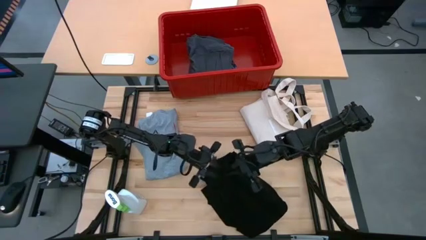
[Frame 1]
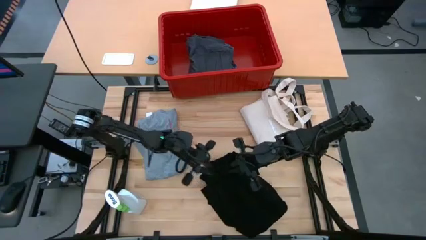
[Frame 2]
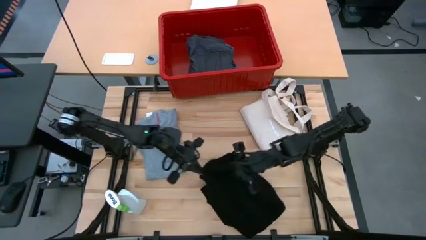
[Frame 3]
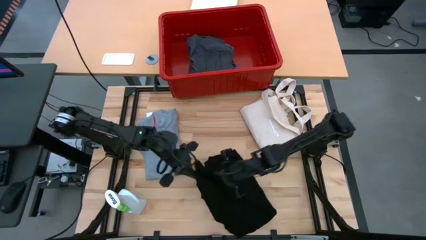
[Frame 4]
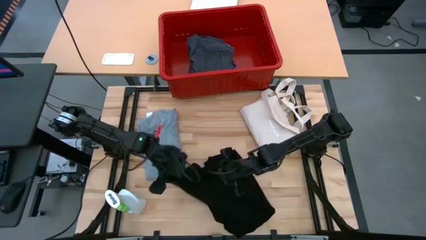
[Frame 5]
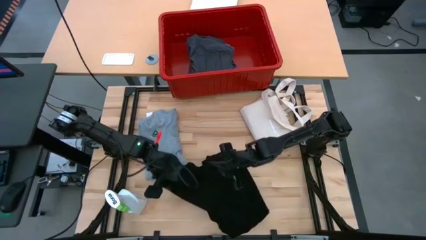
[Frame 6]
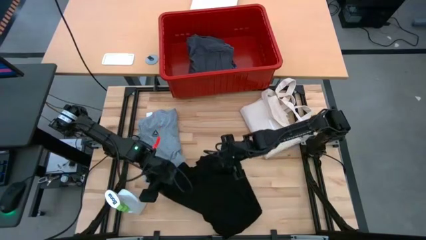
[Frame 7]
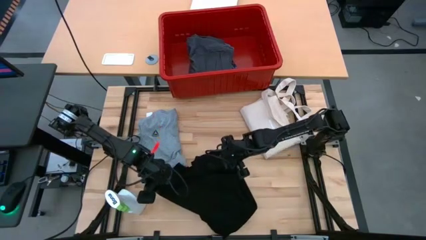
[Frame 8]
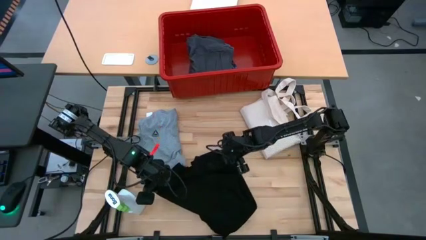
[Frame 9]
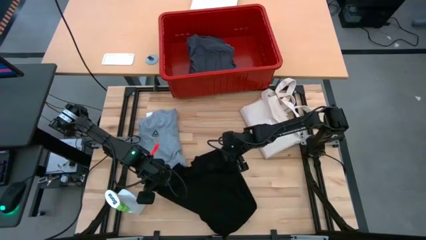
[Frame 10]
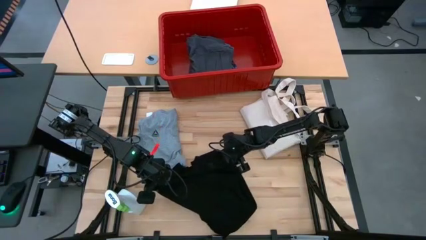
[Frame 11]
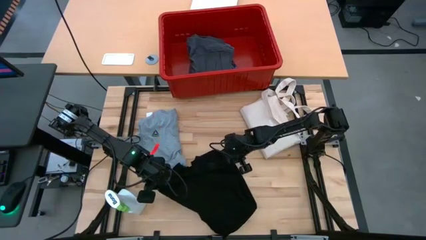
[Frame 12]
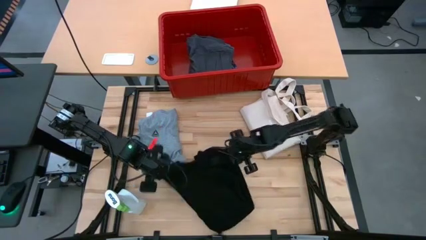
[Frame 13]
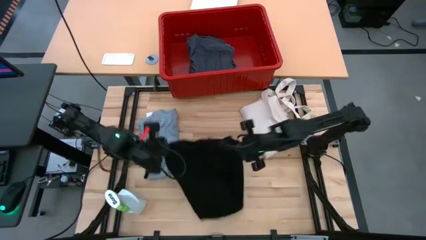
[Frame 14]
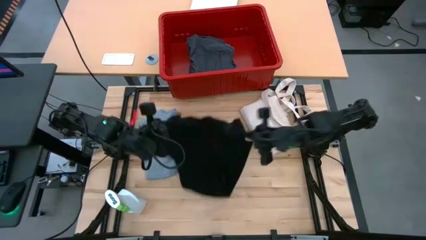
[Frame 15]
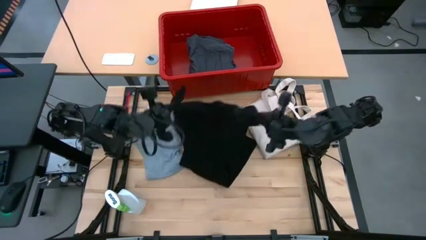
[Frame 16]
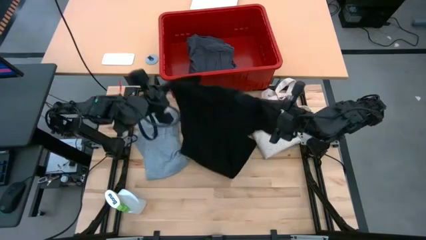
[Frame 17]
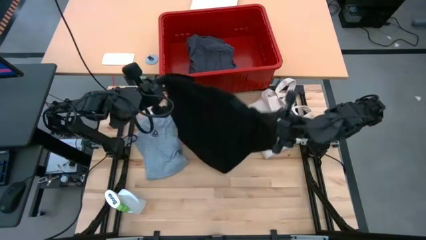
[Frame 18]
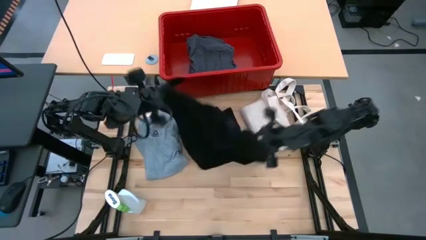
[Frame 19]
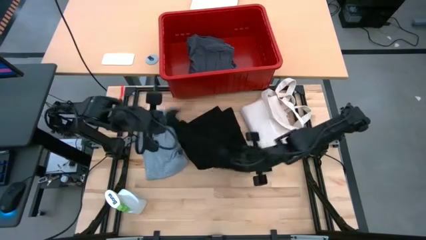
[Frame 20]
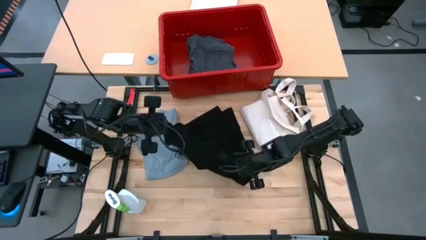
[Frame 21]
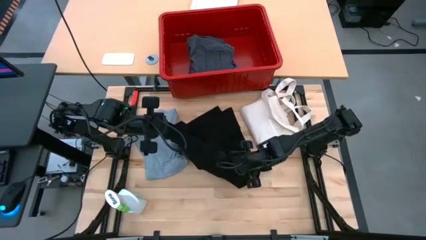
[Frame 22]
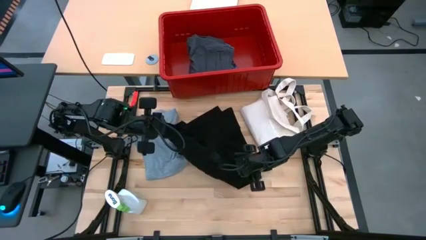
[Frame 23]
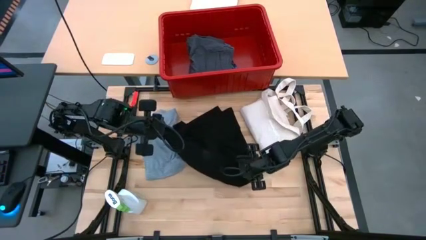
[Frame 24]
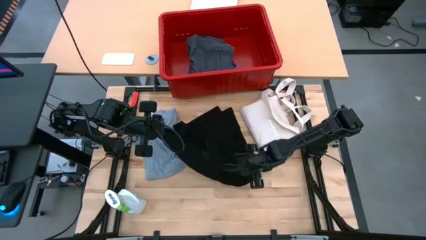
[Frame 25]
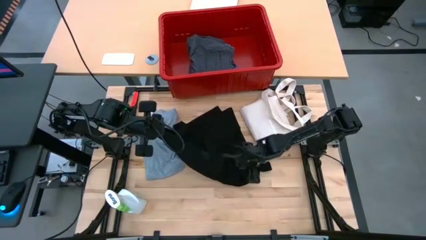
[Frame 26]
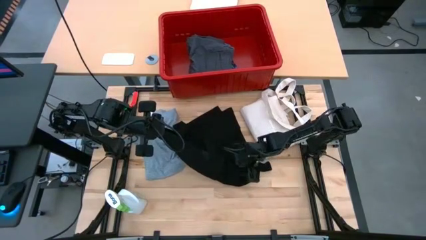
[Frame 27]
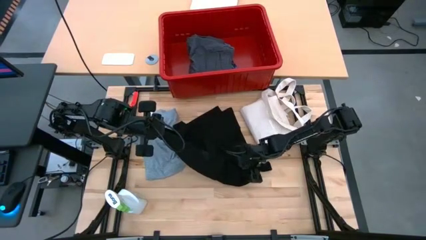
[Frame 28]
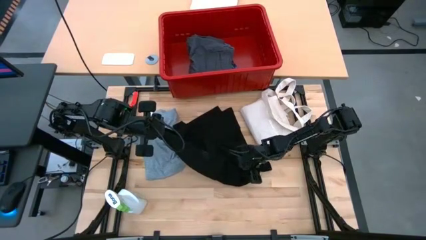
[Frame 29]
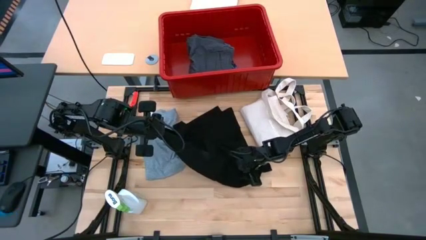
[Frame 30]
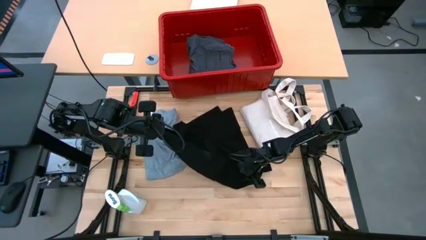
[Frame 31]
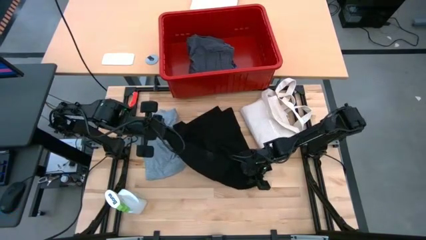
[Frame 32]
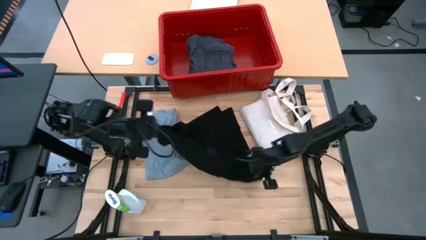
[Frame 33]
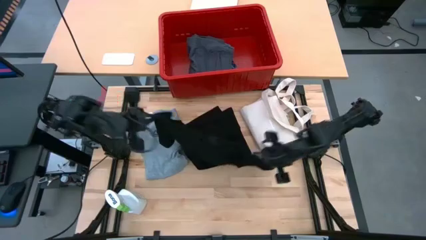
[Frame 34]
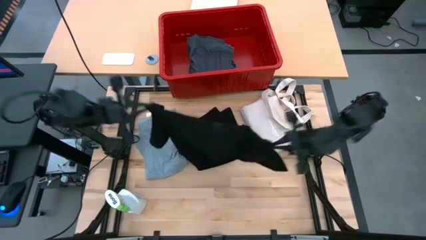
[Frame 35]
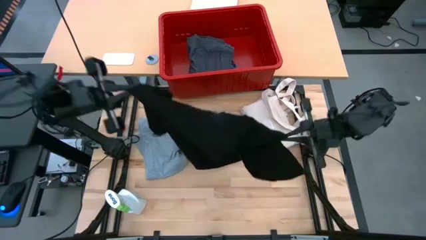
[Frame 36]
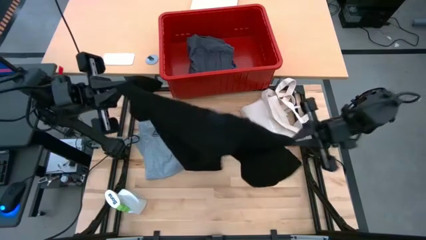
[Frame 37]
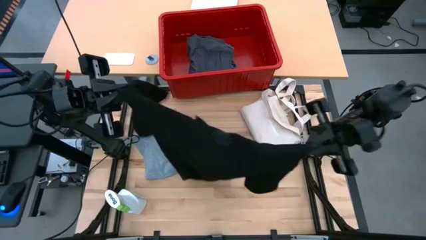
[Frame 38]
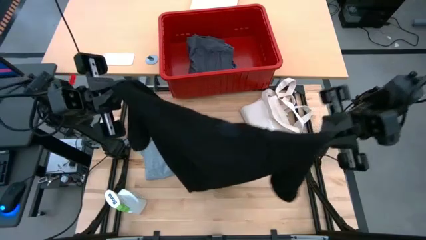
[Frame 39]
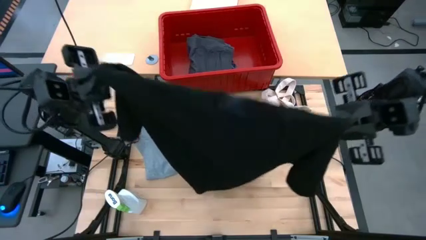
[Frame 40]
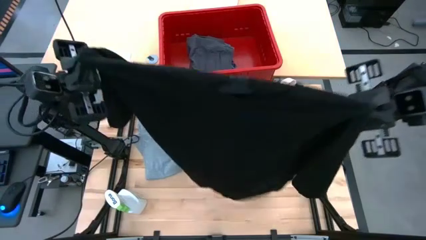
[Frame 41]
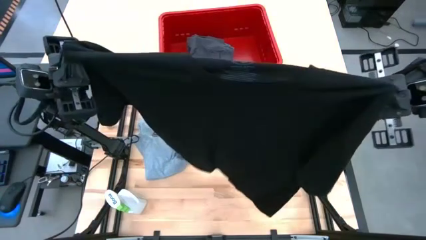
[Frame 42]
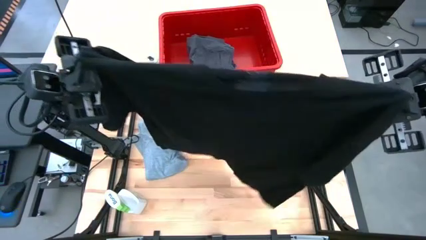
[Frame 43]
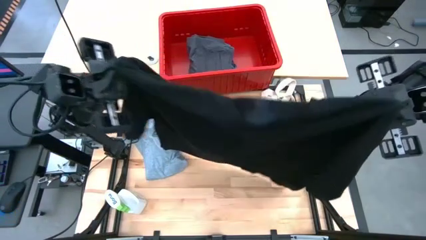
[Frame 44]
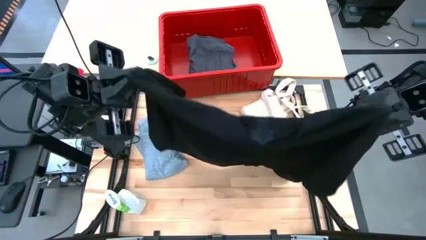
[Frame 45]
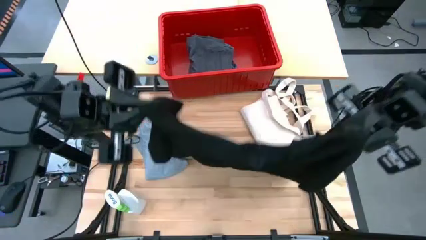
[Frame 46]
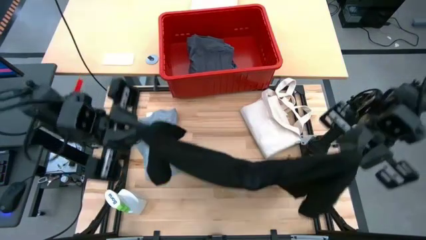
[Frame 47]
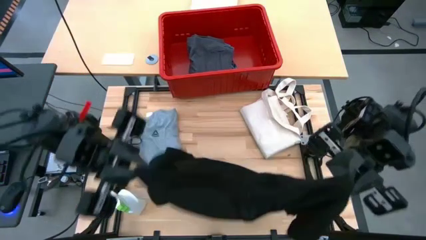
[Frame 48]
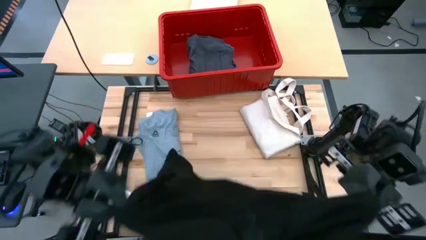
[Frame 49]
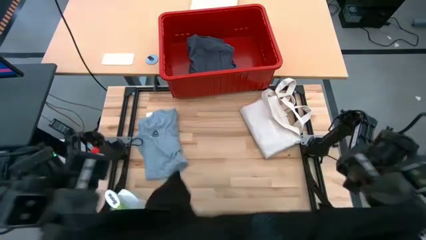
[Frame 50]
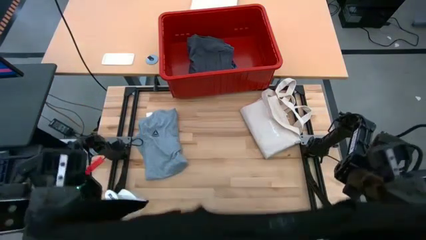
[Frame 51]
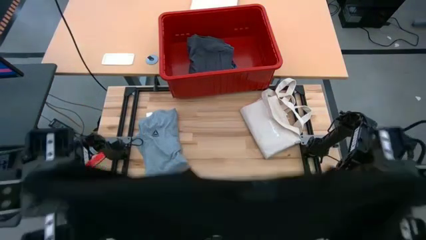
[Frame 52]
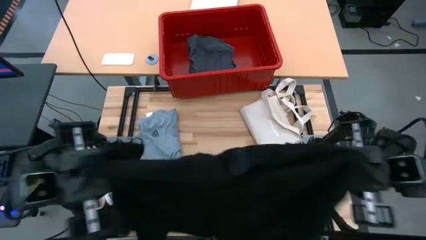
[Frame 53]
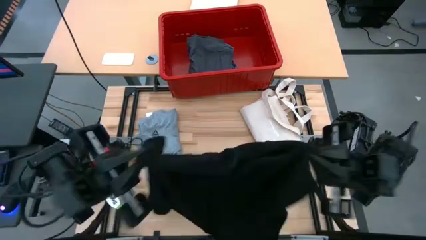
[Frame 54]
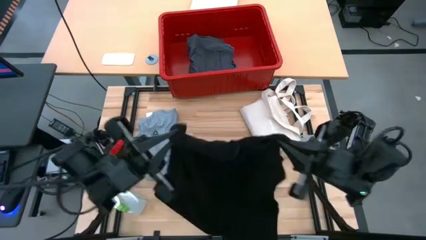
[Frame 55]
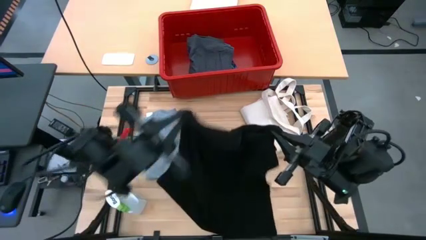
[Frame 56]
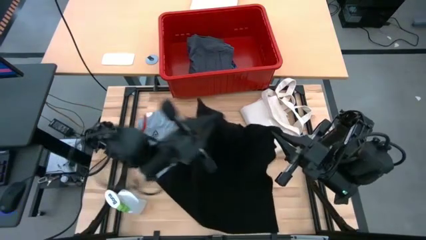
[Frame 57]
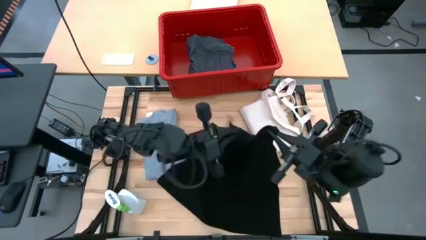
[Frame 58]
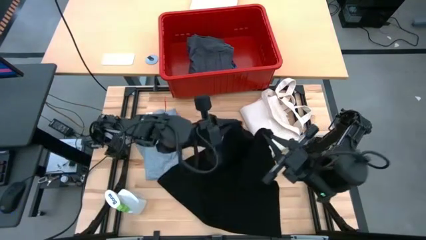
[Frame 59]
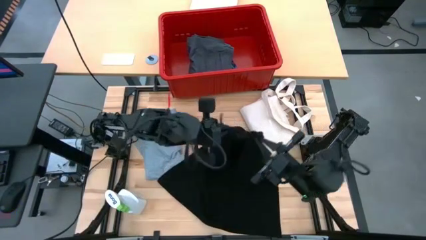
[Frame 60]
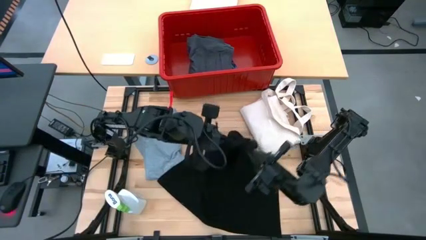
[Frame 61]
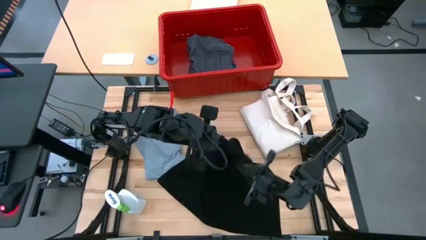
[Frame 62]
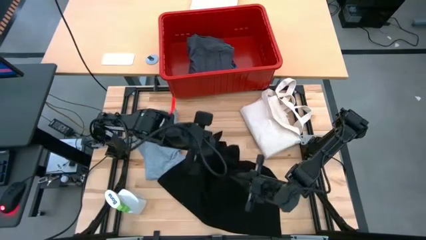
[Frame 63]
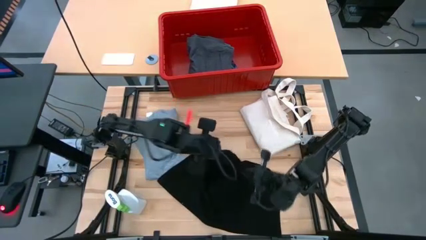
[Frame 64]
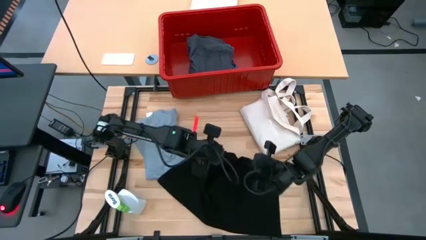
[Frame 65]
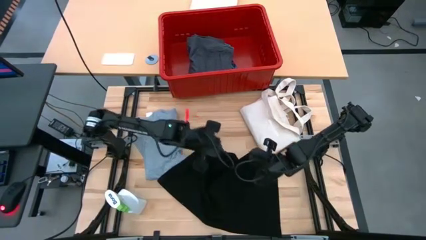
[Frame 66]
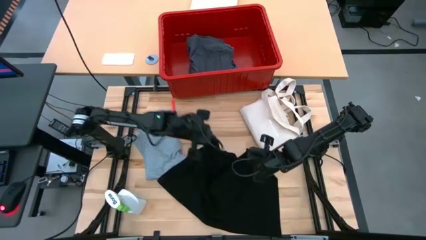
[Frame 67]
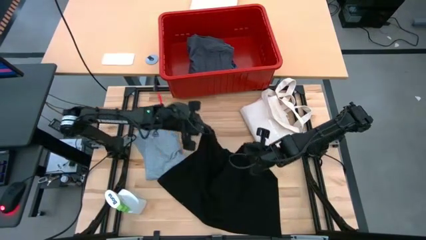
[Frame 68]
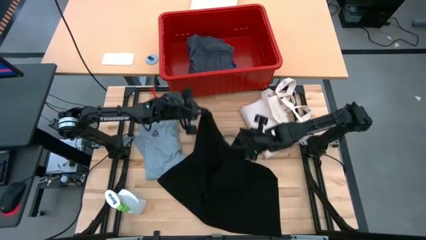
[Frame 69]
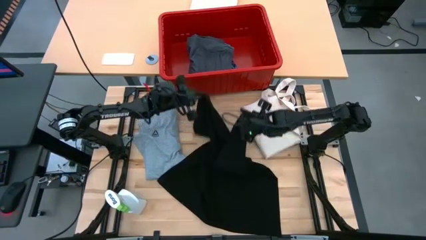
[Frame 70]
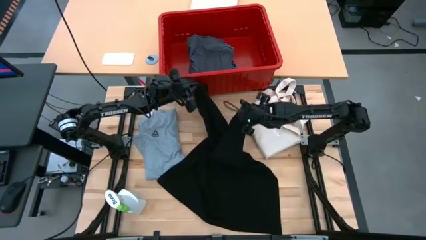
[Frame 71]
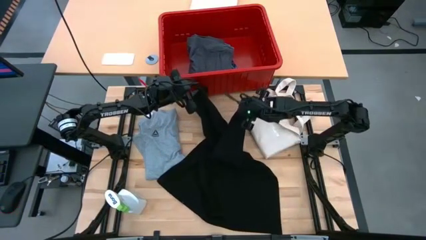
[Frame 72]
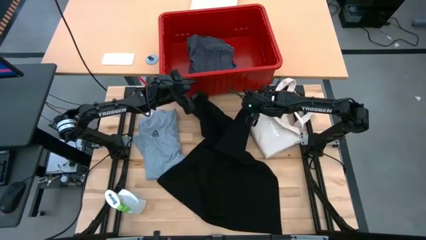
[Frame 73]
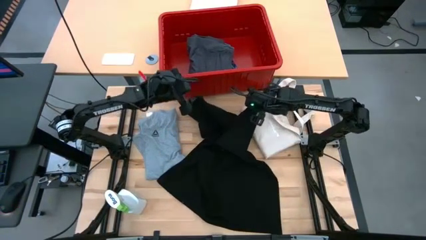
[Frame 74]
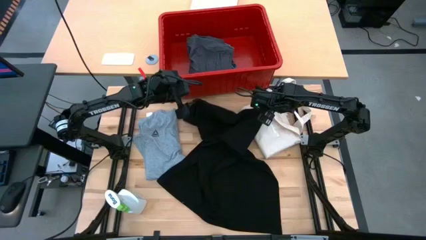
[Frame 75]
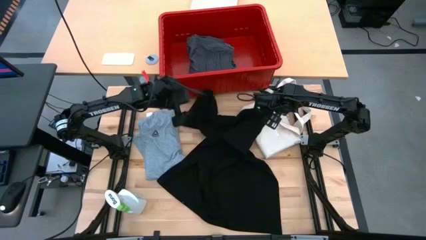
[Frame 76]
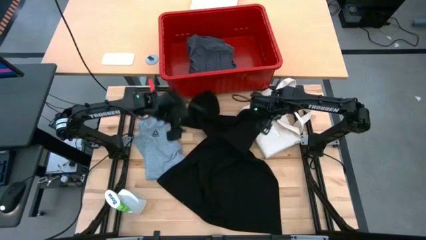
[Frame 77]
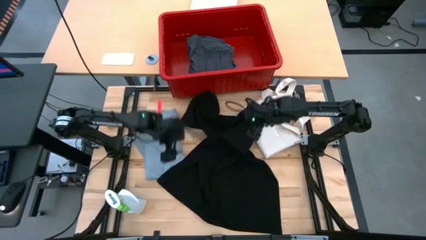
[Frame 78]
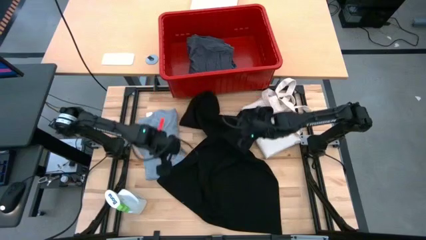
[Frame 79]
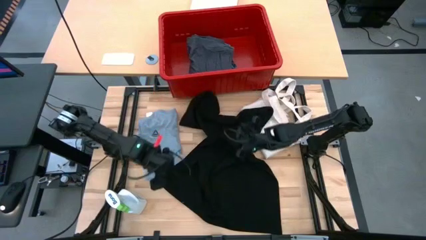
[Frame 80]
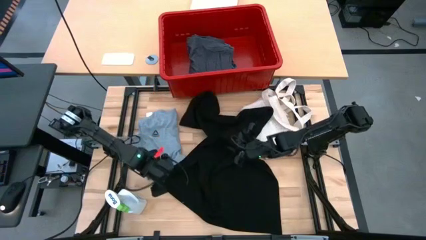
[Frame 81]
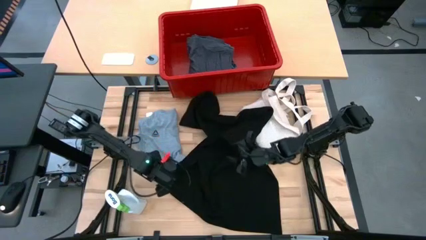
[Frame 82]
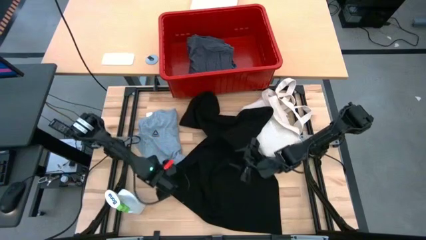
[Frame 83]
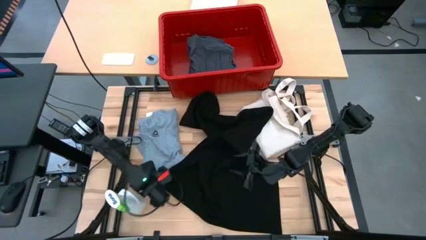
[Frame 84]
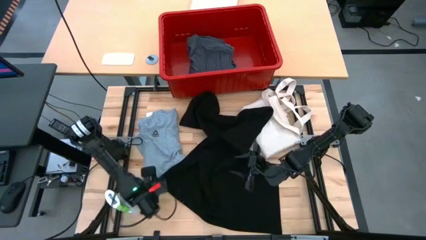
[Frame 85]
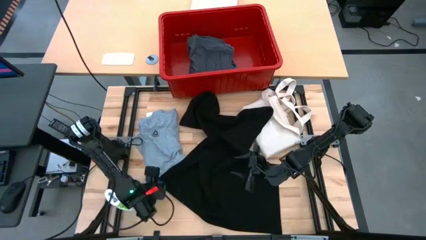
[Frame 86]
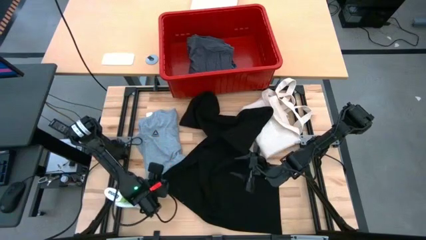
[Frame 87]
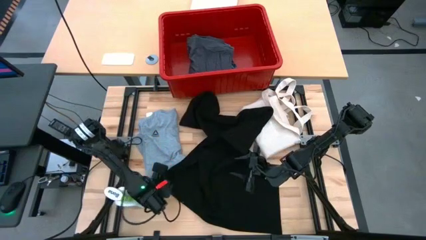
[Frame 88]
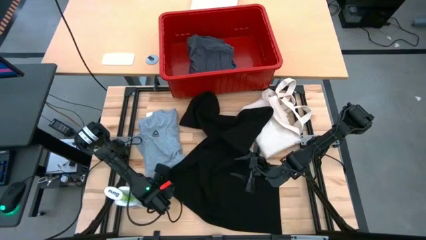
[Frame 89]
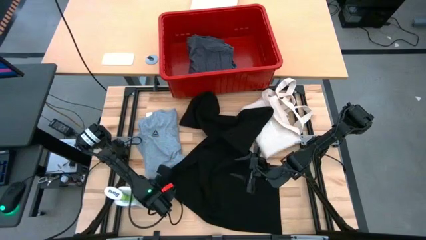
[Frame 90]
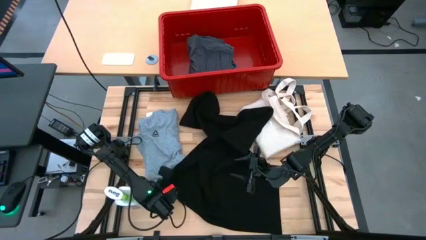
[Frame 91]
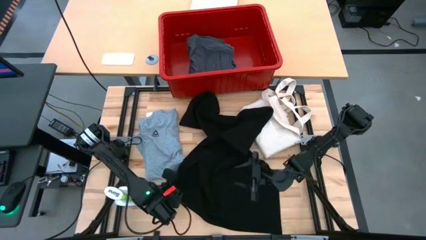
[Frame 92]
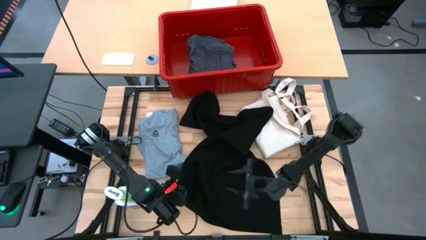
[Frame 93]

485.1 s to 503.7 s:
Task: Fold Laundry from Bin
Fold the black shirt
